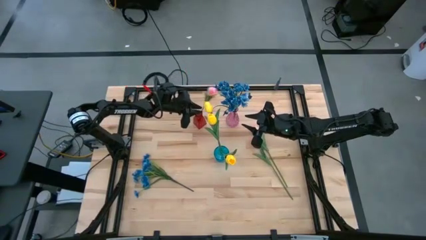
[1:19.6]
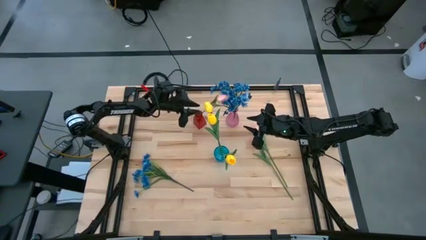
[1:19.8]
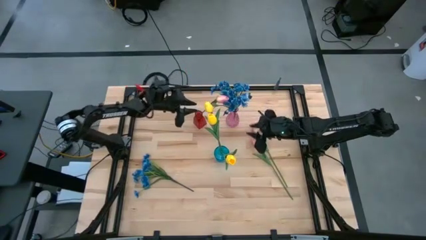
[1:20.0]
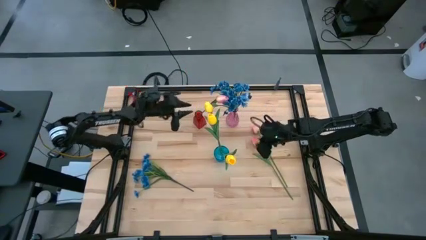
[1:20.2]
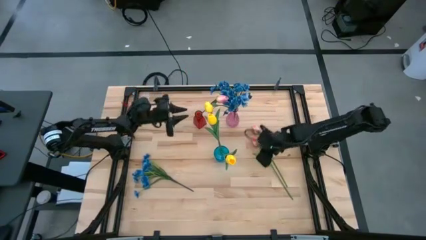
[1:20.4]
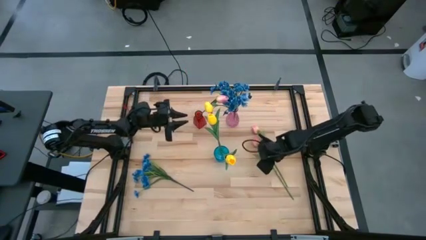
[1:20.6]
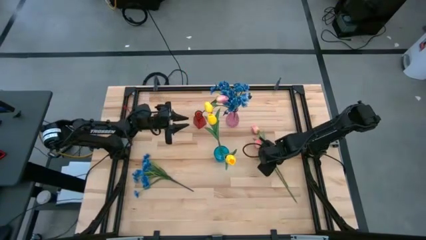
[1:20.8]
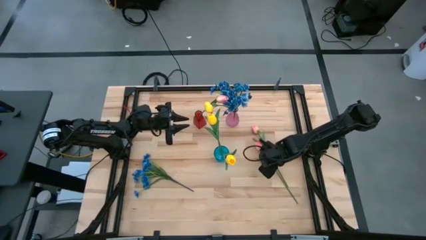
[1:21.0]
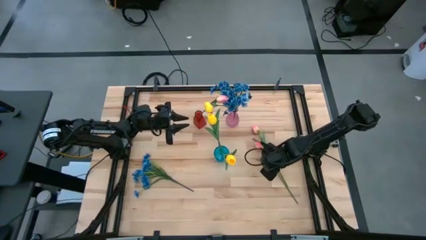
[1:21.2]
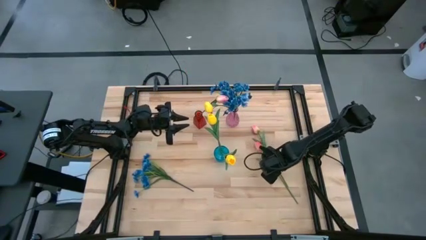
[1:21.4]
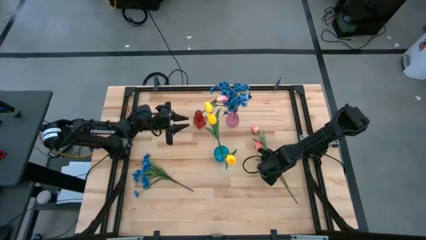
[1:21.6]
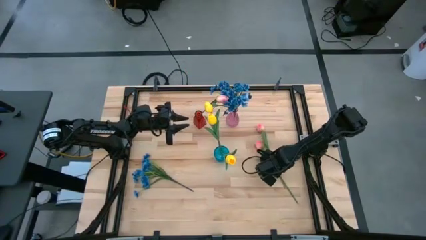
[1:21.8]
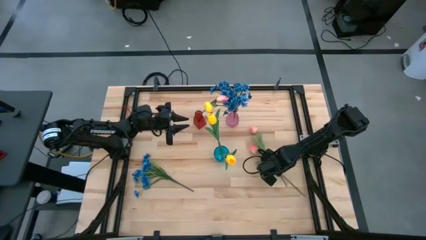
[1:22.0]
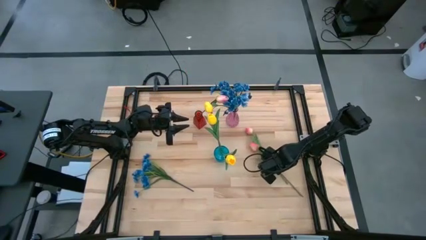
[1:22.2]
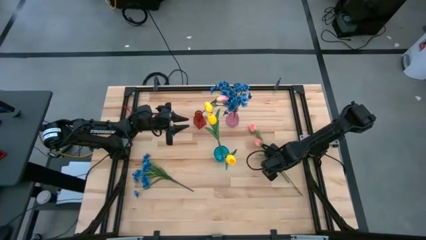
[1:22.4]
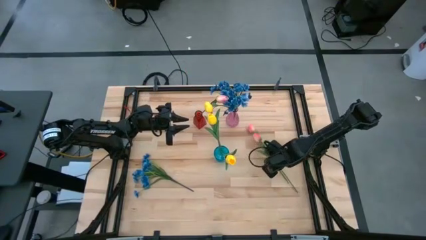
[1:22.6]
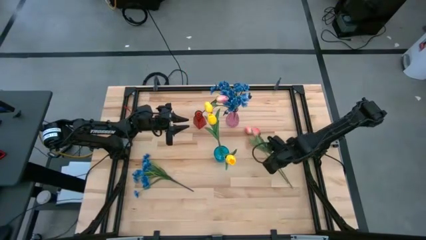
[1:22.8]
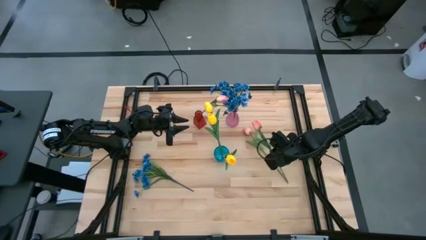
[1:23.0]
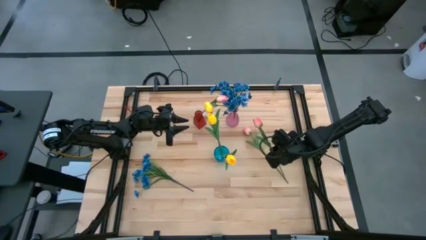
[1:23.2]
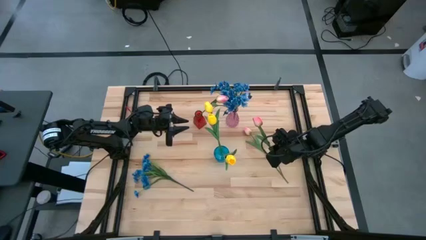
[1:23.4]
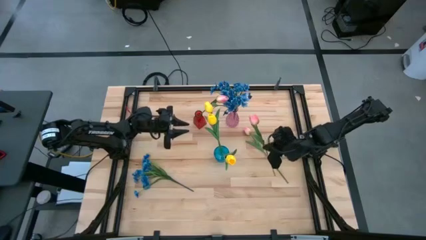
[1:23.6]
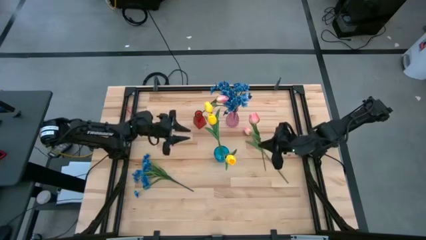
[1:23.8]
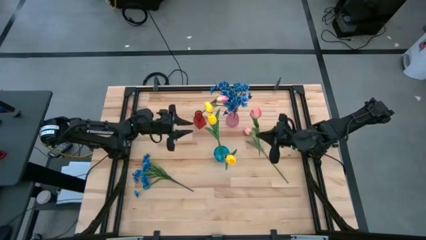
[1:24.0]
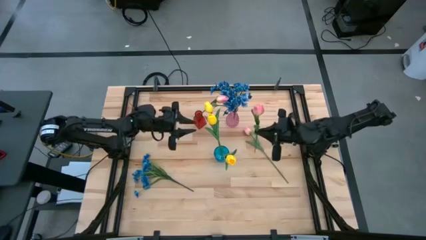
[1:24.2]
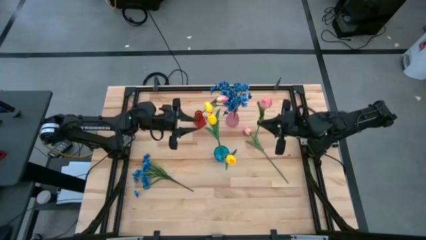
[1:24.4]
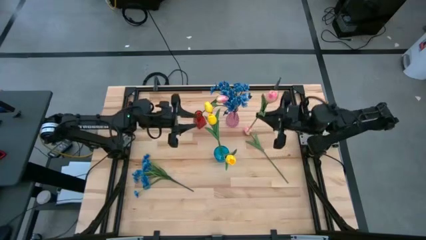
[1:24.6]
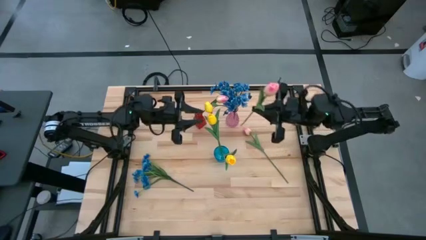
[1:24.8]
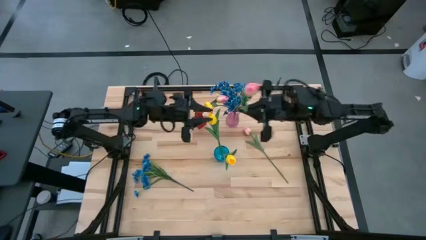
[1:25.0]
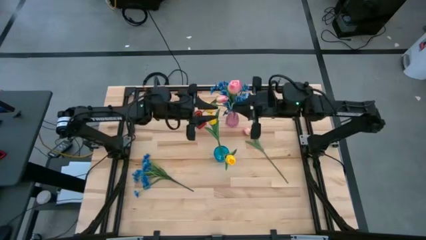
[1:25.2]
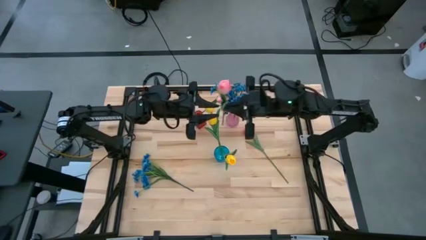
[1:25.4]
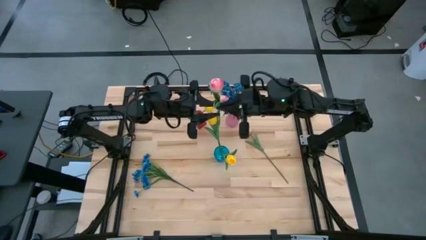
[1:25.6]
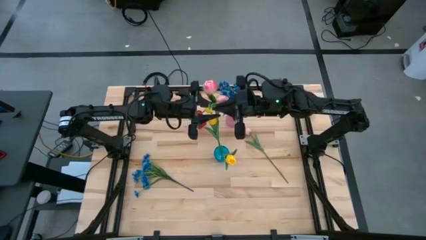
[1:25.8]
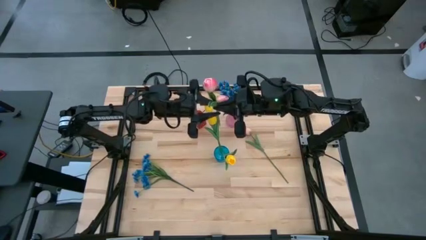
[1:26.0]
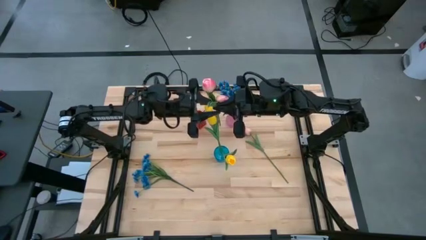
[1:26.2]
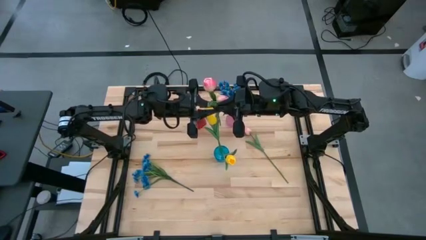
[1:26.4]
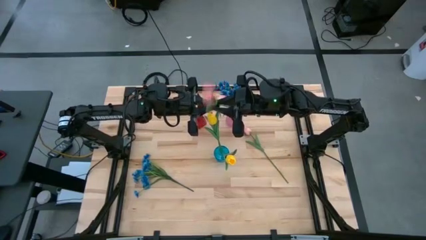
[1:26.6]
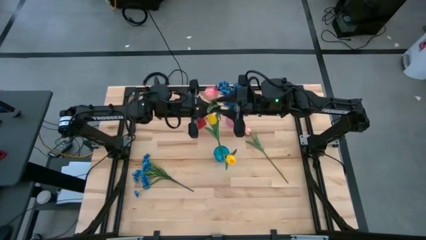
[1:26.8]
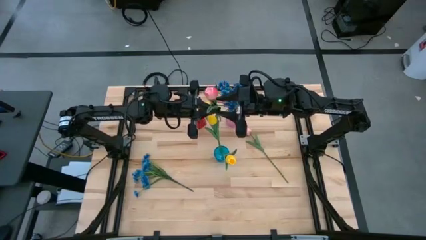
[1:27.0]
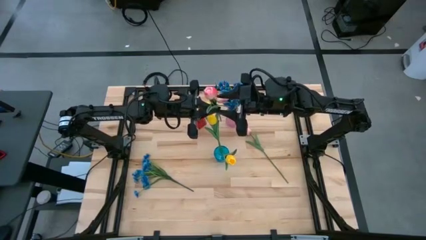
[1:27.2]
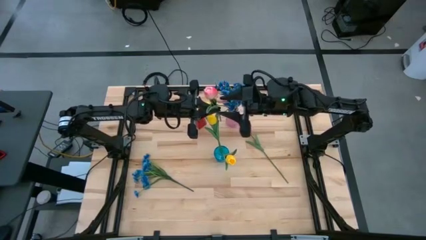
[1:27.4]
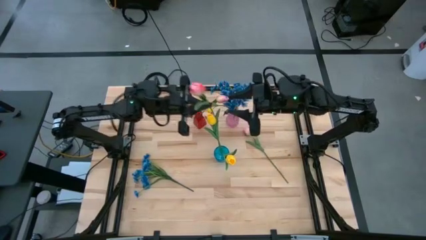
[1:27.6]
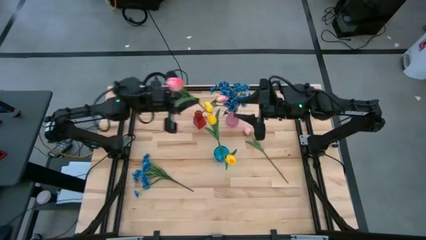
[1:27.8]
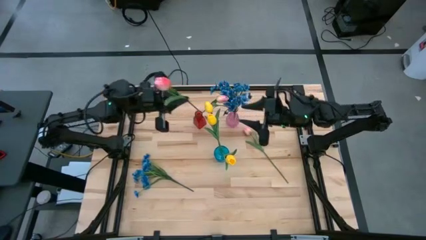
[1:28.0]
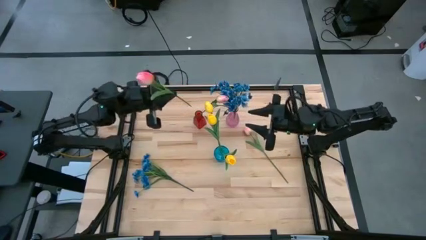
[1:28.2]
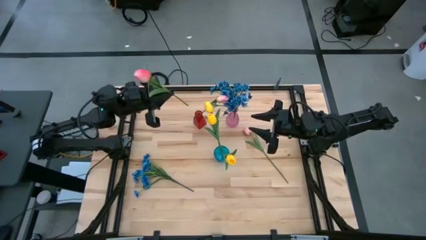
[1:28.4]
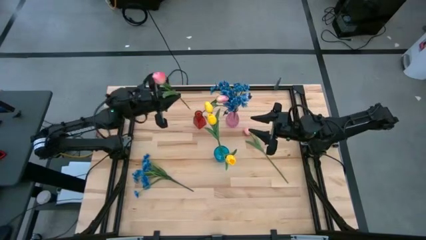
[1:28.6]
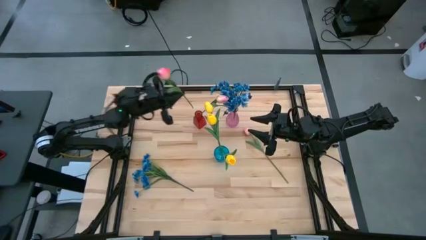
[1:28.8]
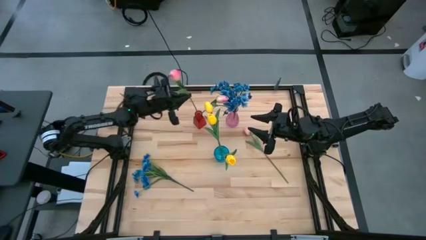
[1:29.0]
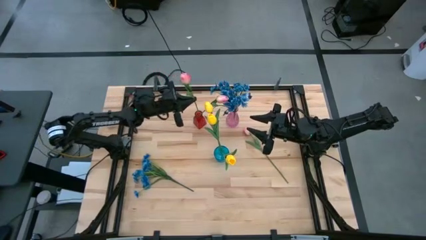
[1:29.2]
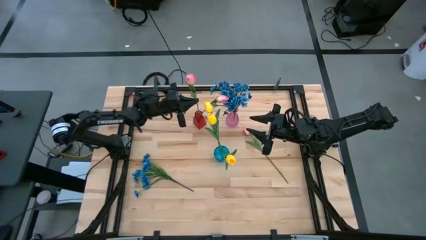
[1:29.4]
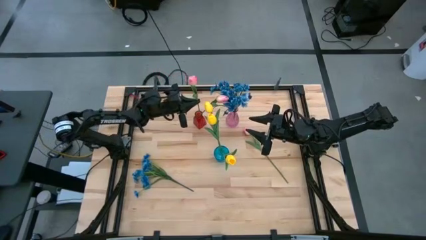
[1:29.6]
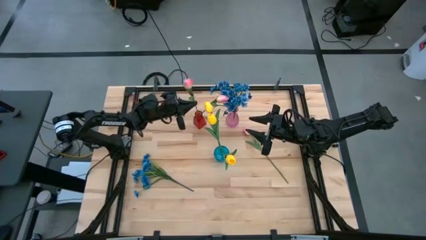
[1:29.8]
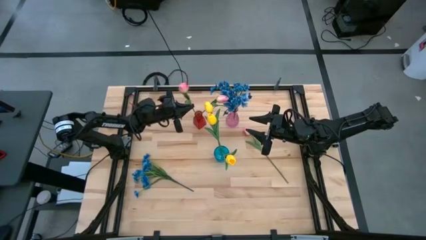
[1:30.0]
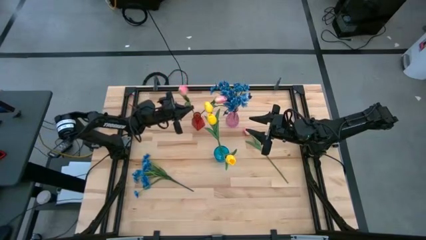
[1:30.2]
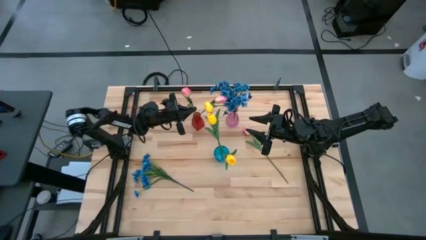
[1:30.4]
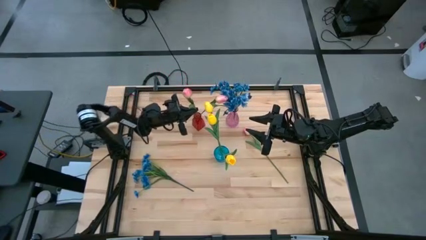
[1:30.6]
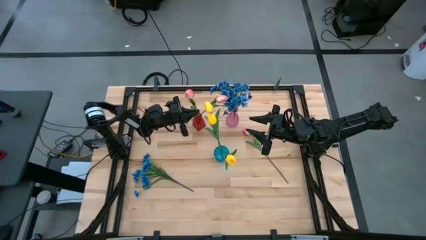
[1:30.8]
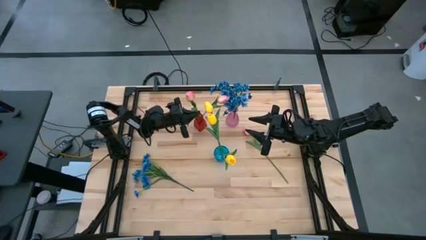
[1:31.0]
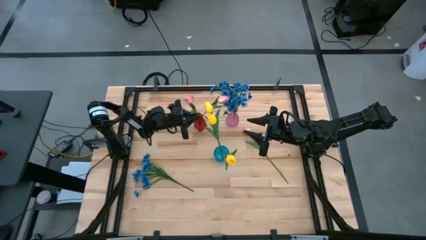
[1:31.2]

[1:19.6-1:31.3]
Task: Sort flowers into vase by color
Put the bottom pink flower into the red vase
